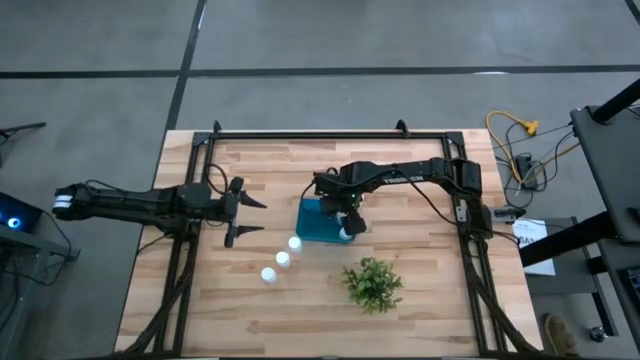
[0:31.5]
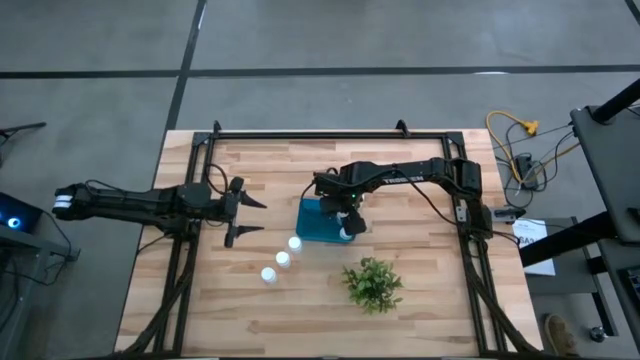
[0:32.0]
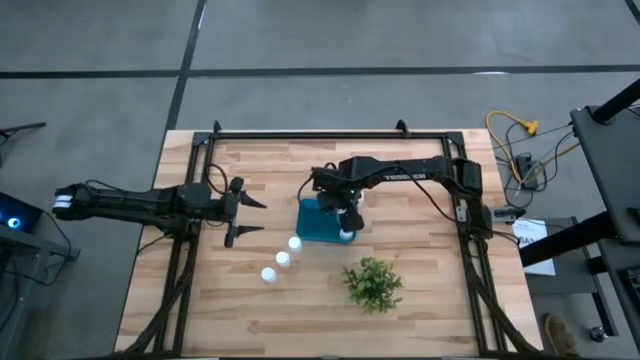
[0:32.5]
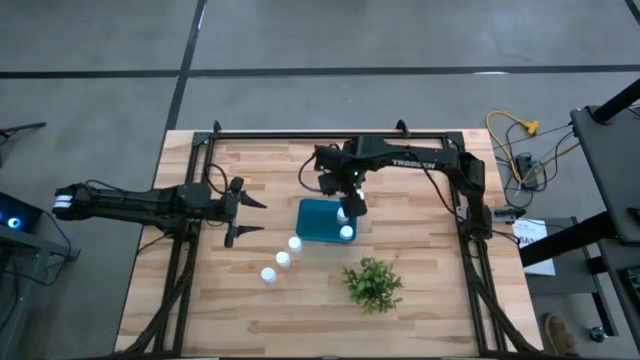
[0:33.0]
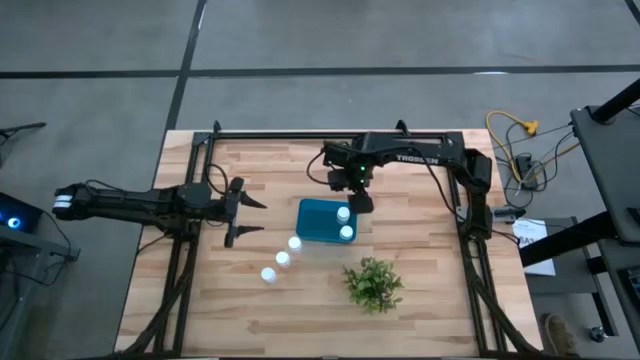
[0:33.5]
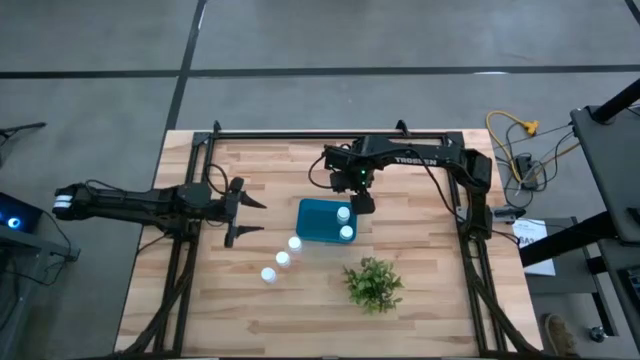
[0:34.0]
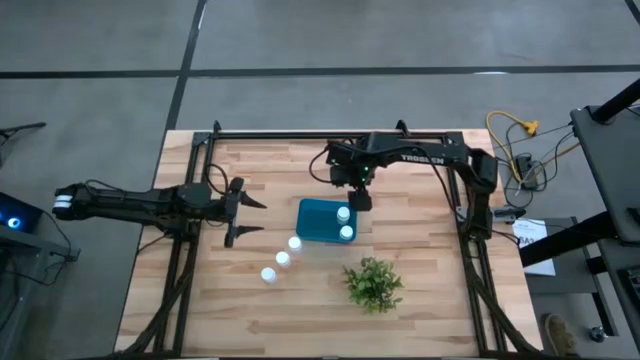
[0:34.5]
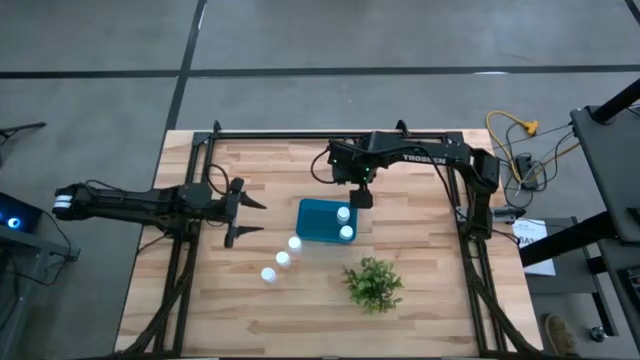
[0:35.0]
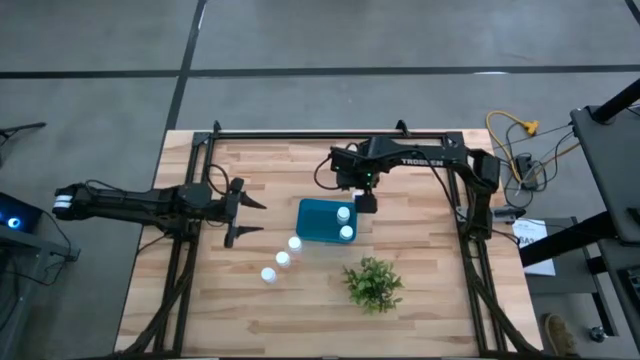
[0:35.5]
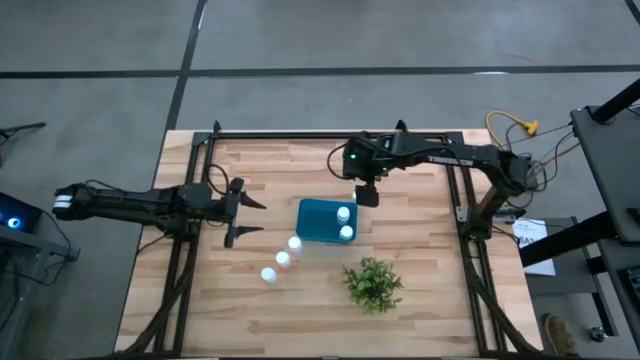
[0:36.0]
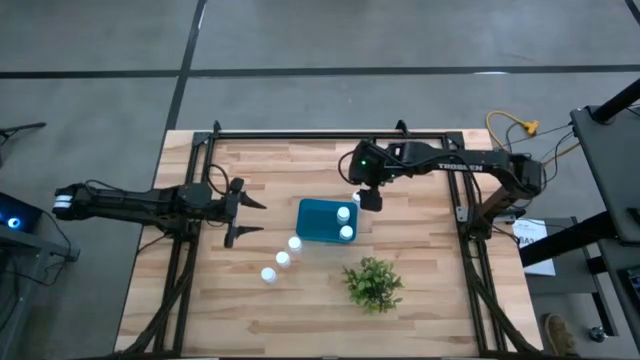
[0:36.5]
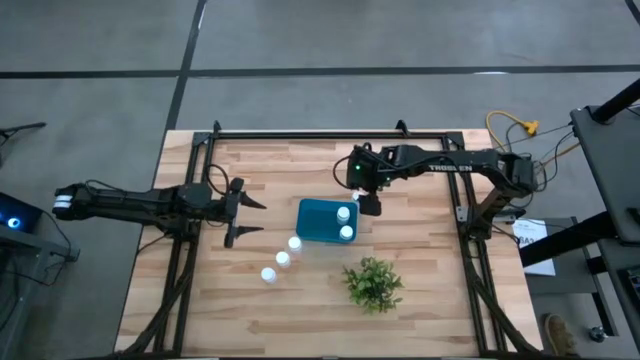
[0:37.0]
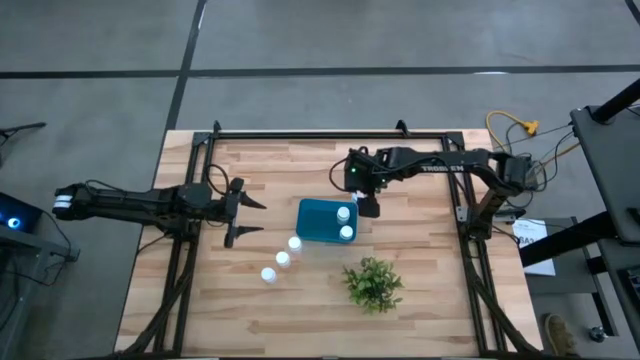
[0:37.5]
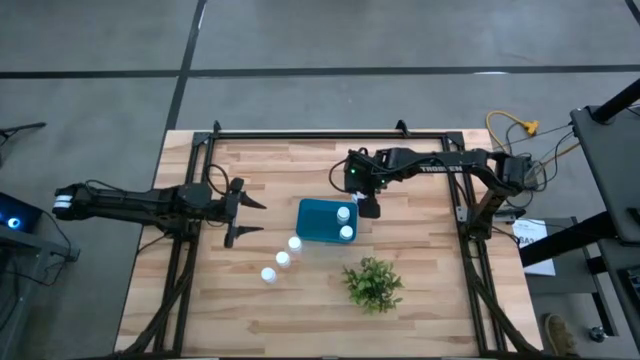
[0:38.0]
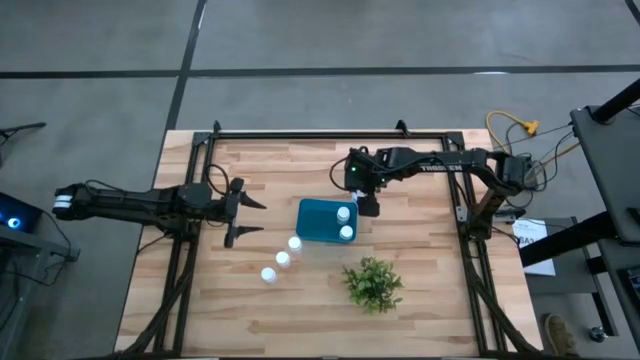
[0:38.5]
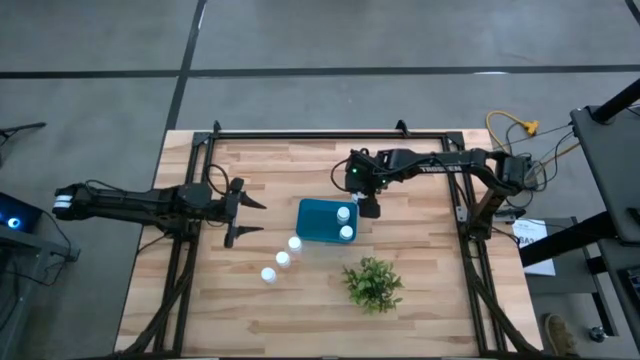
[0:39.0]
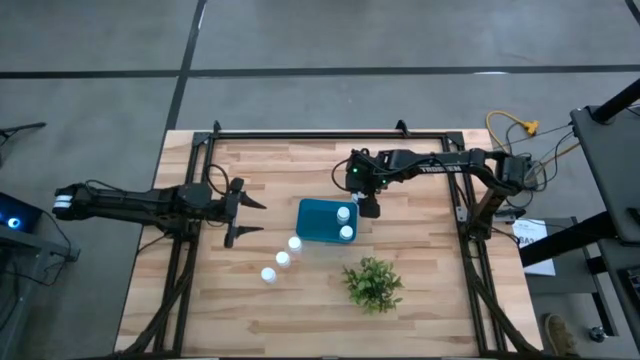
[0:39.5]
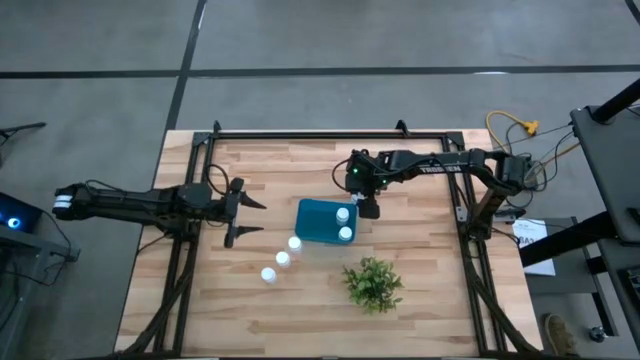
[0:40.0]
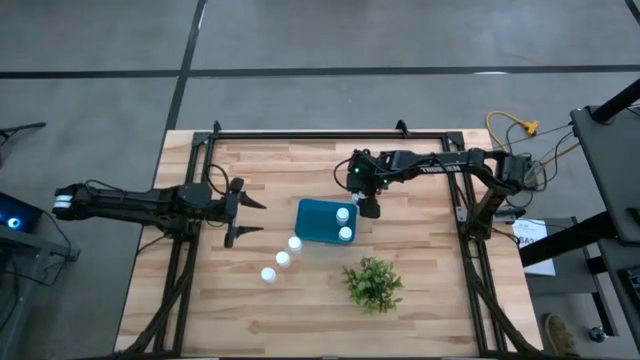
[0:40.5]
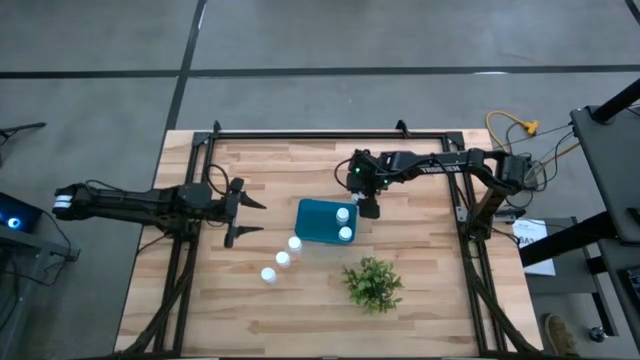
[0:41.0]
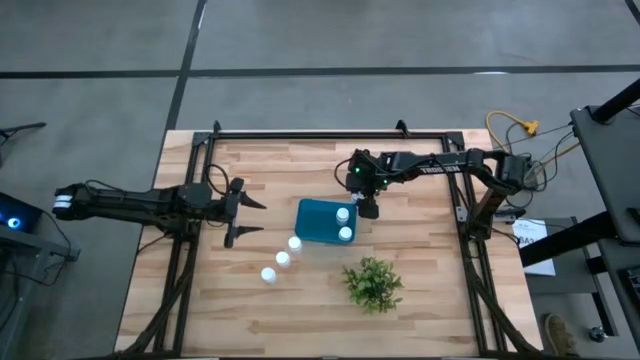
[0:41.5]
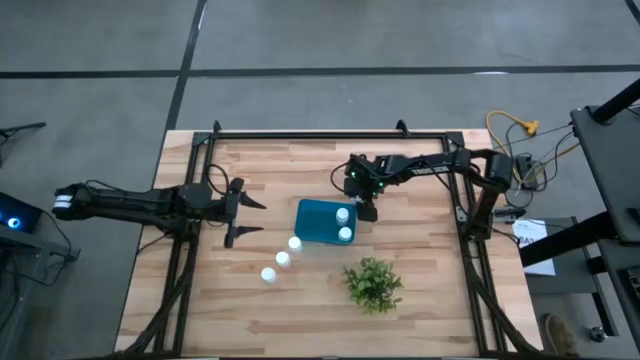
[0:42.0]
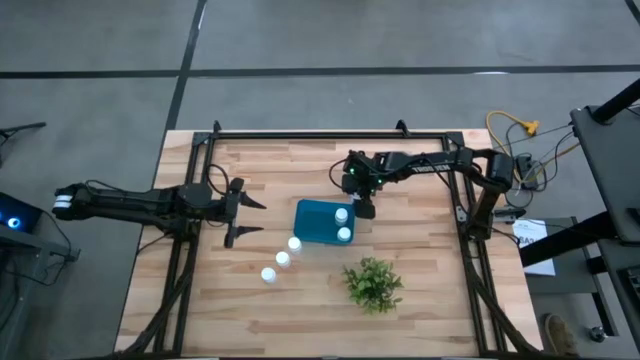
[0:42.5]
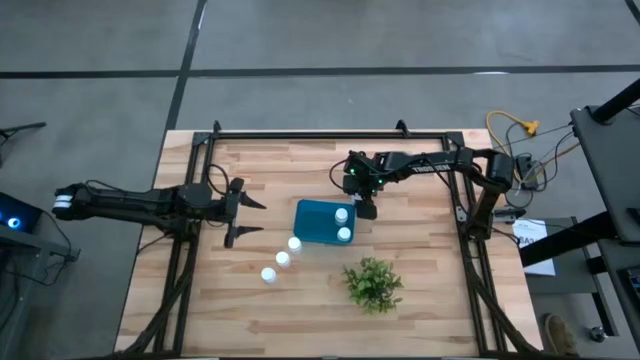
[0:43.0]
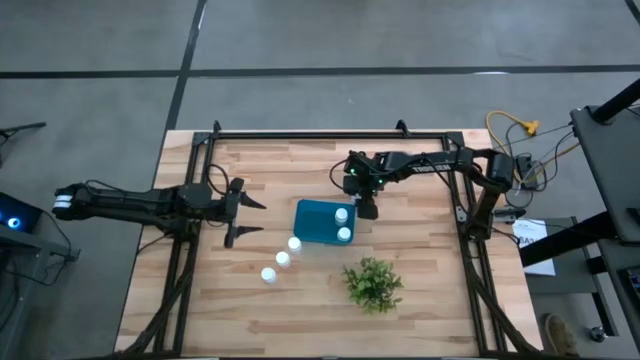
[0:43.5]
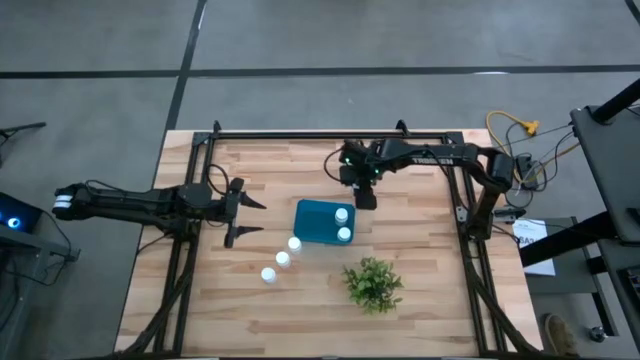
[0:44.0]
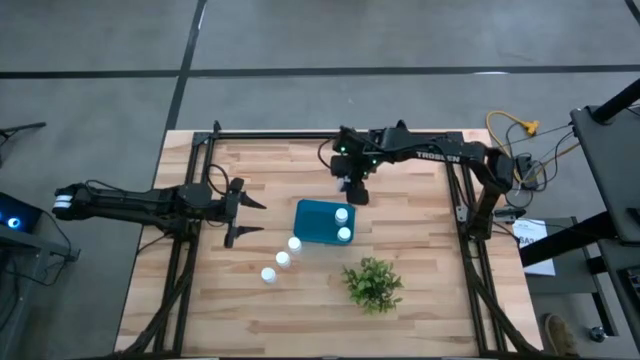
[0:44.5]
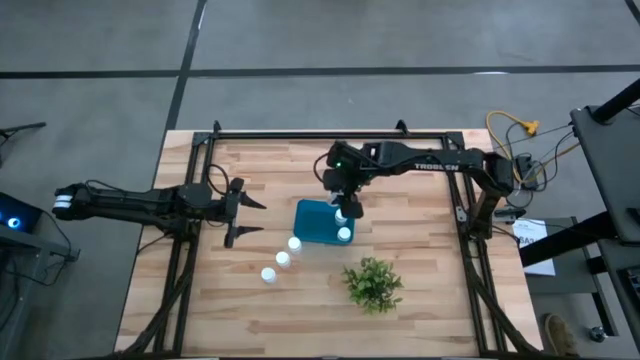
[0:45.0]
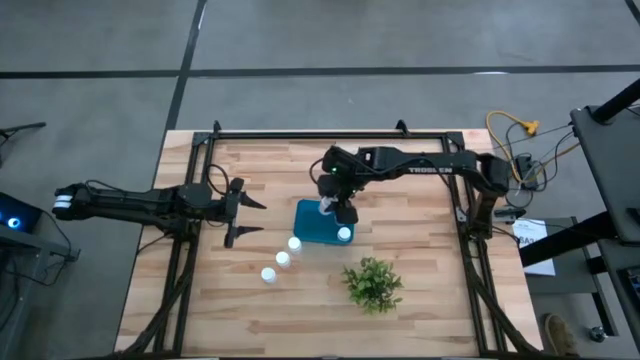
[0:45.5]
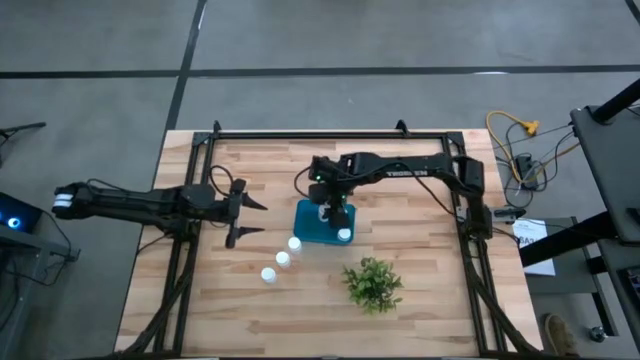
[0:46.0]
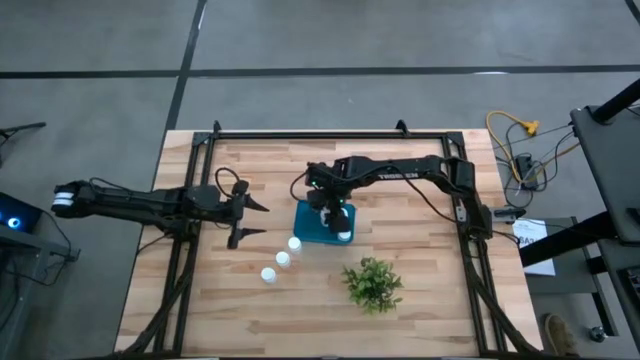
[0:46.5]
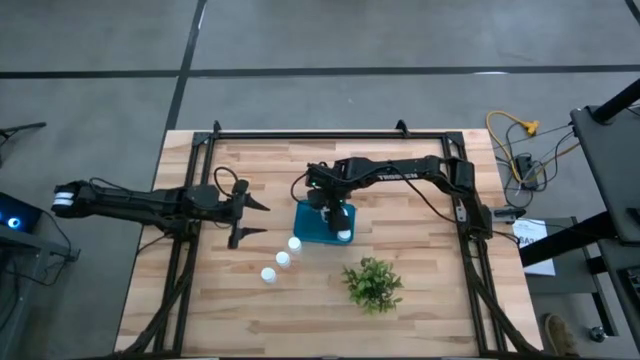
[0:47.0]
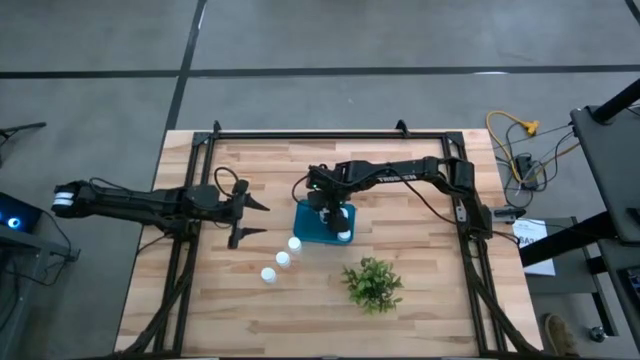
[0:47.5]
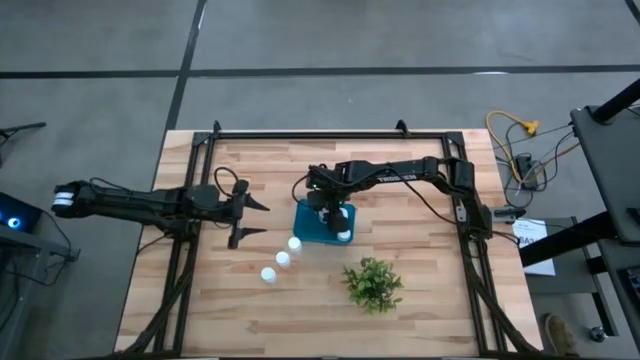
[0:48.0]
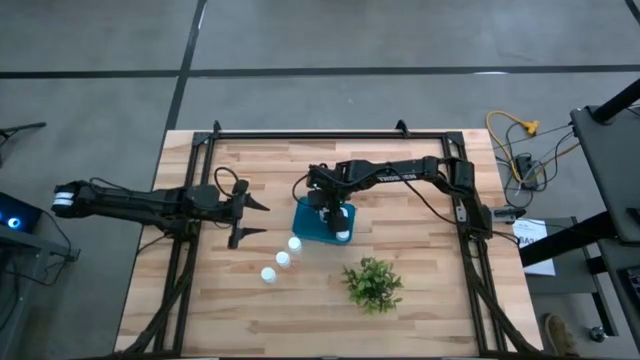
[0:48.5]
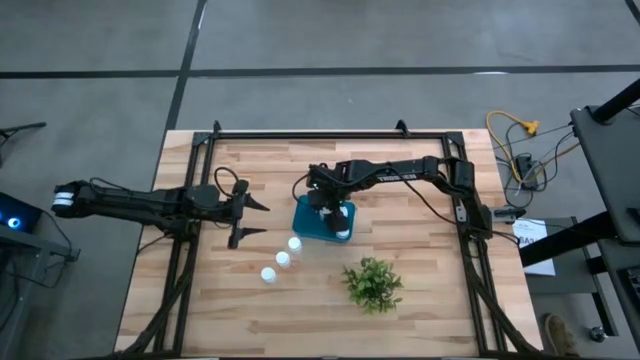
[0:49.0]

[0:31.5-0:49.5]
Task: Pick and place pill bottles into a basket
Put the white pill bottle in the blue bin

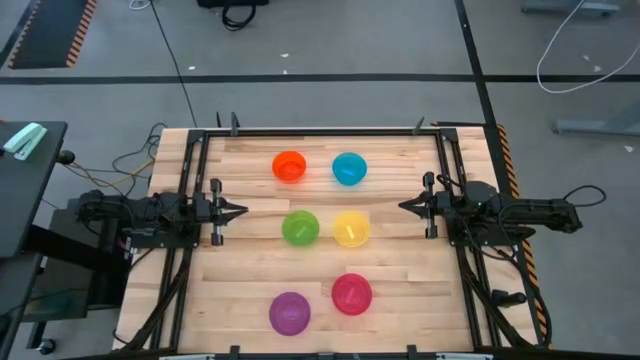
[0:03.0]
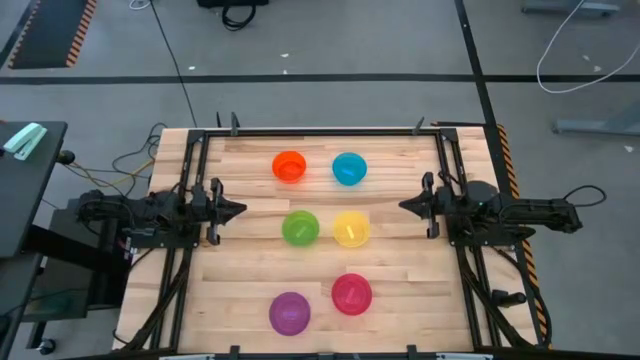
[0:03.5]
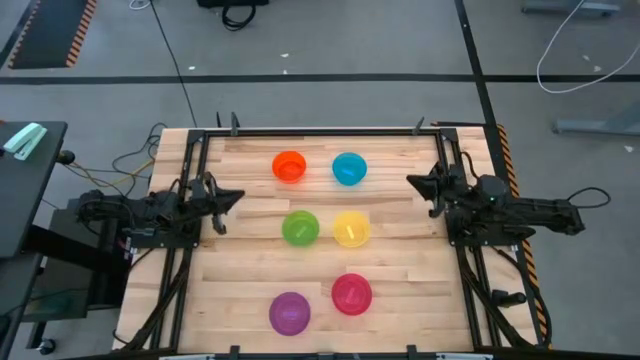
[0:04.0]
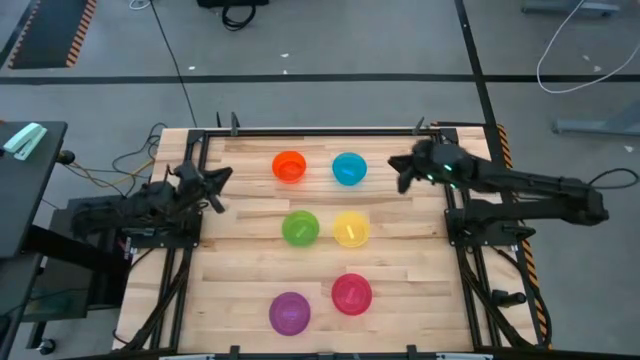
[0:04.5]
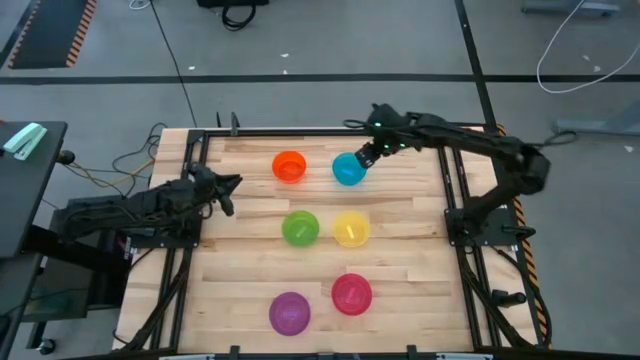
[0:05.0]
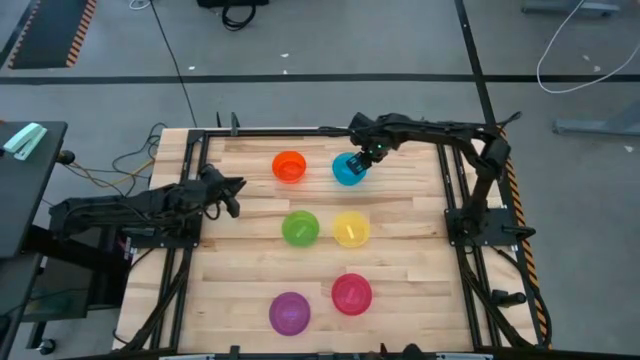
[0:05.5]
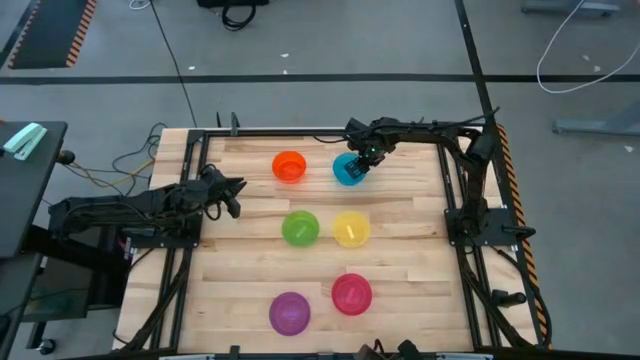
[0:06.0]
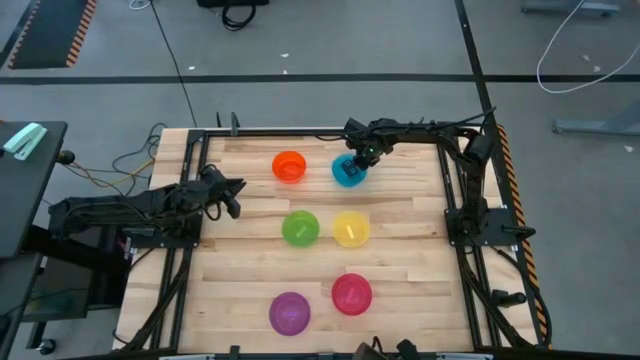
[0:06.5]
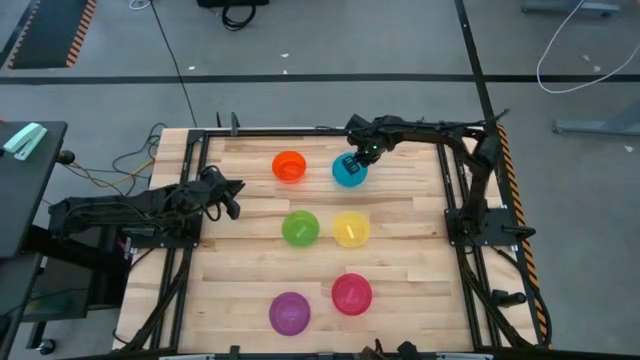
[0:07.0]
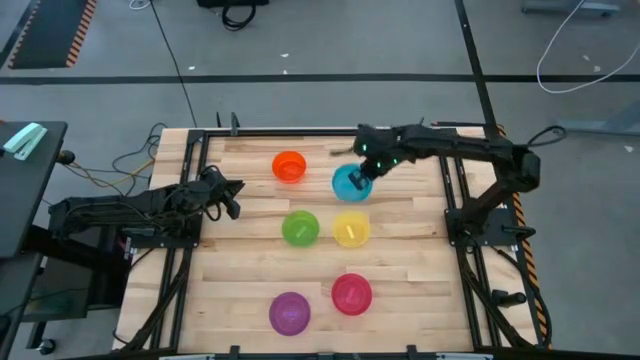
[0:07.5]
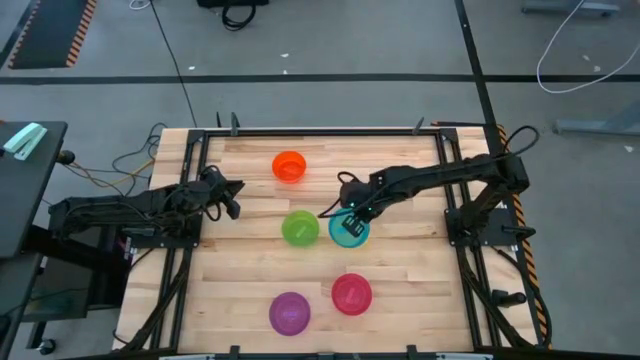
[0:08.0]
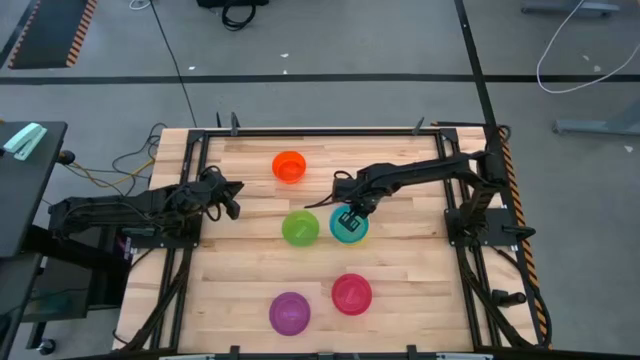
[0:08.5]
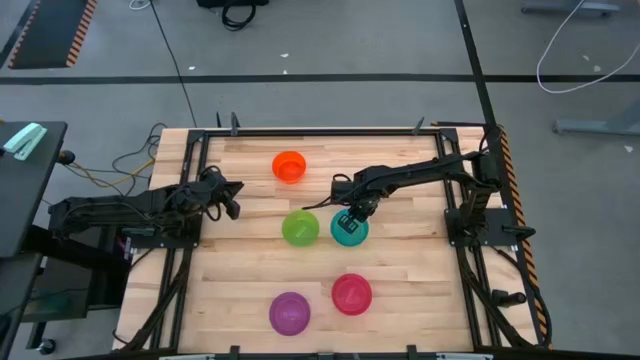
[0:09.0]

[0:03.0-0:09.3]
Task: Nest bowls inside each other
Stack the blue bowl on the yellow bowl
